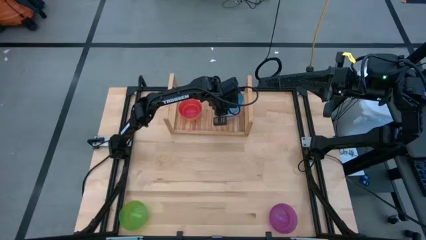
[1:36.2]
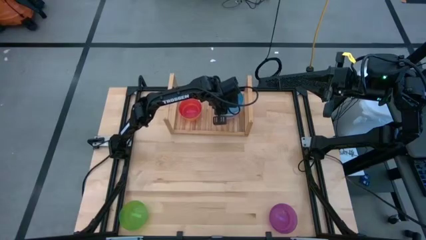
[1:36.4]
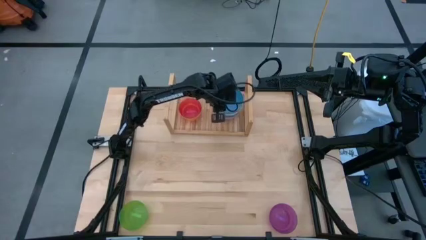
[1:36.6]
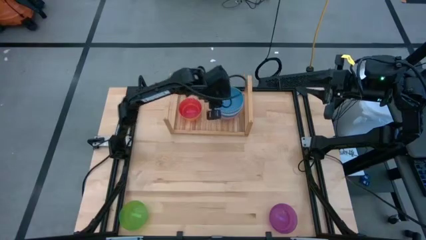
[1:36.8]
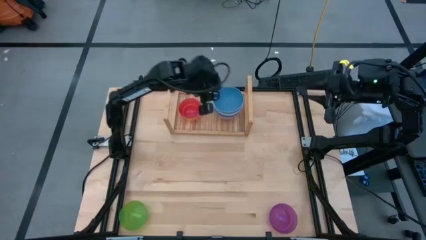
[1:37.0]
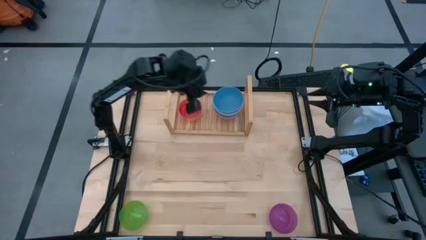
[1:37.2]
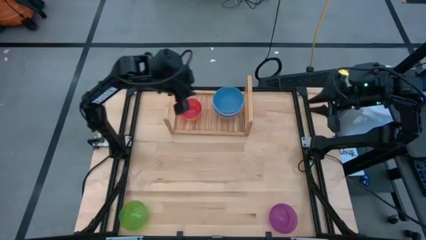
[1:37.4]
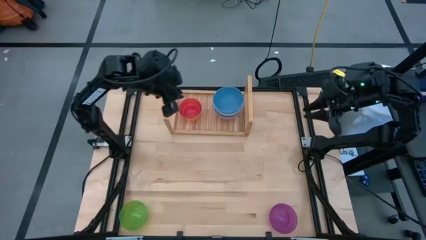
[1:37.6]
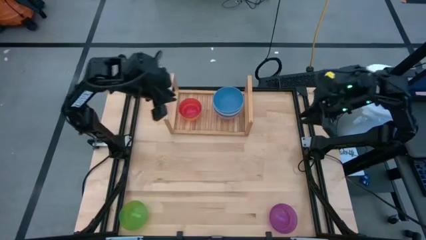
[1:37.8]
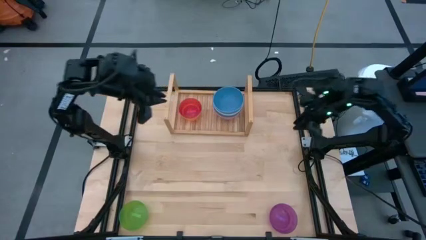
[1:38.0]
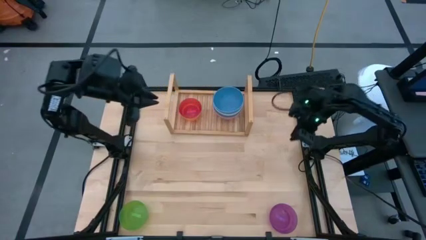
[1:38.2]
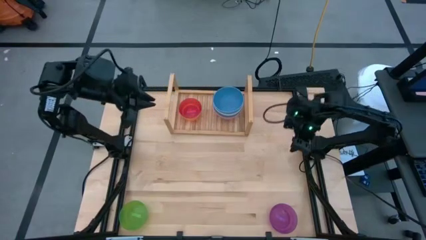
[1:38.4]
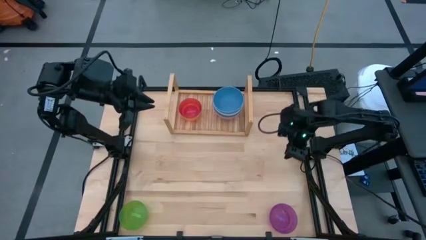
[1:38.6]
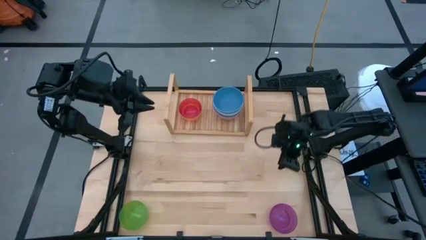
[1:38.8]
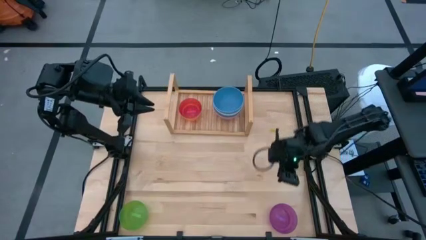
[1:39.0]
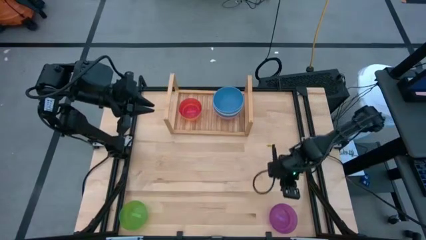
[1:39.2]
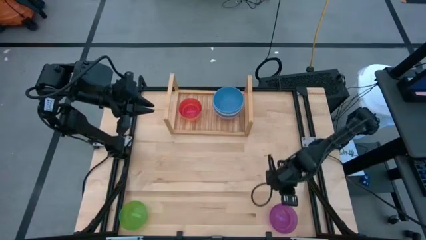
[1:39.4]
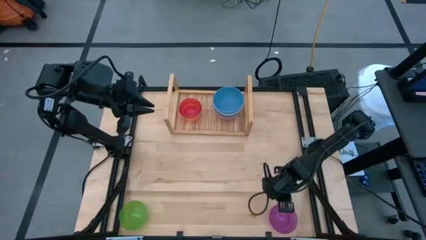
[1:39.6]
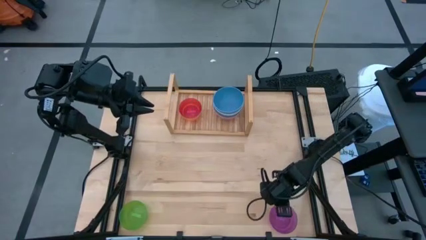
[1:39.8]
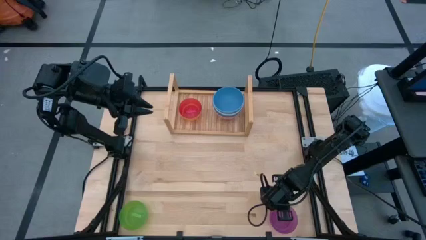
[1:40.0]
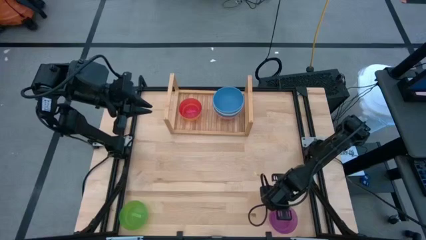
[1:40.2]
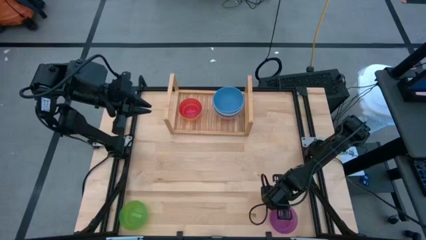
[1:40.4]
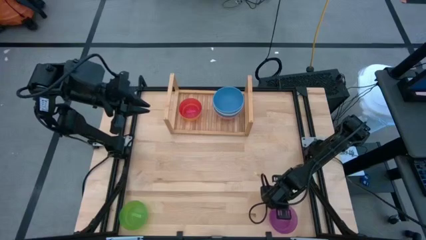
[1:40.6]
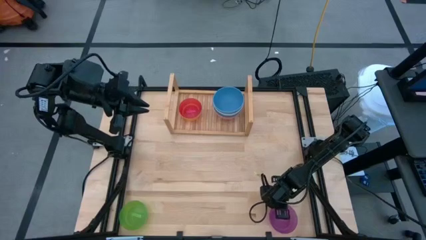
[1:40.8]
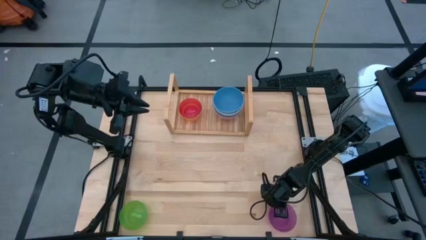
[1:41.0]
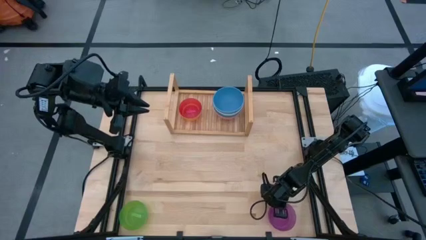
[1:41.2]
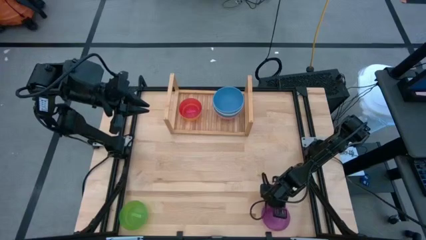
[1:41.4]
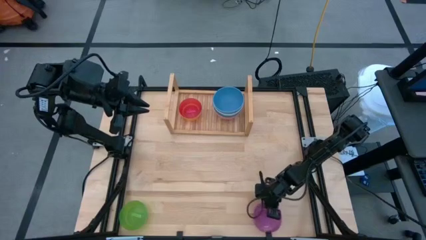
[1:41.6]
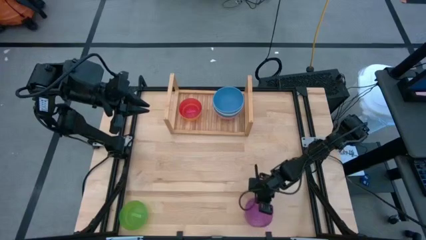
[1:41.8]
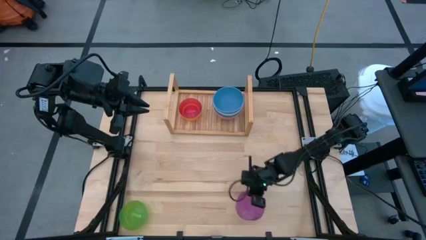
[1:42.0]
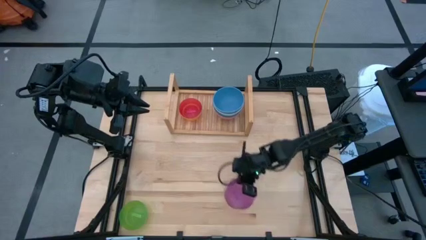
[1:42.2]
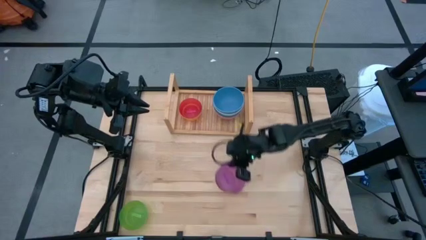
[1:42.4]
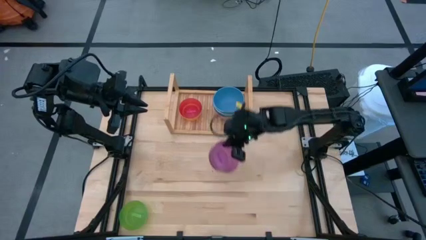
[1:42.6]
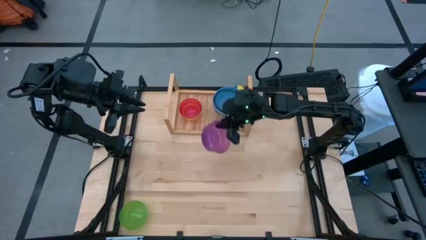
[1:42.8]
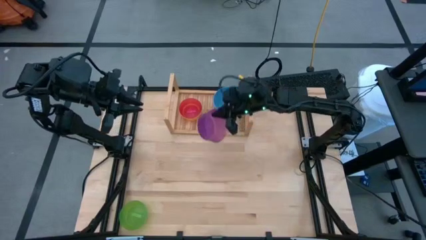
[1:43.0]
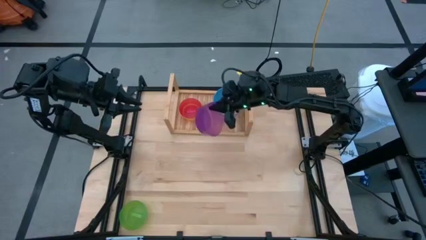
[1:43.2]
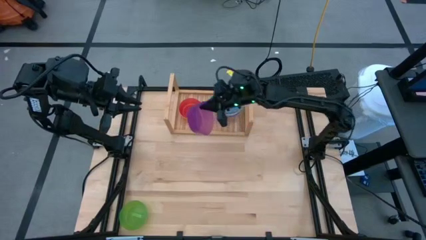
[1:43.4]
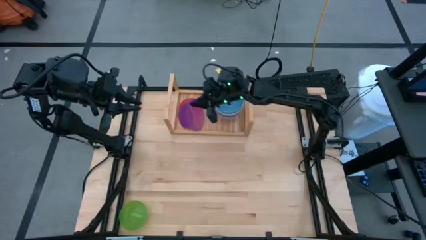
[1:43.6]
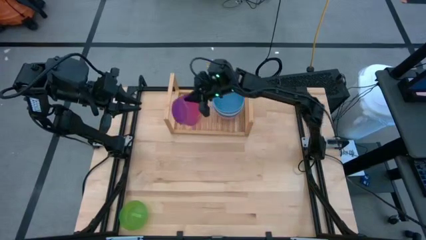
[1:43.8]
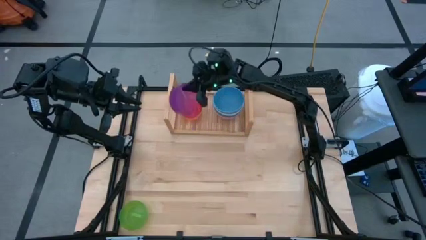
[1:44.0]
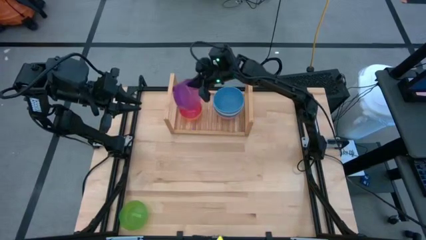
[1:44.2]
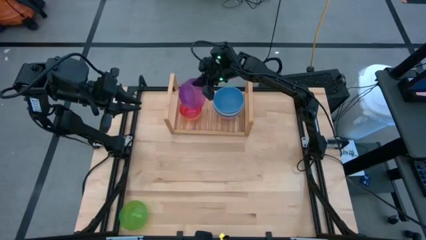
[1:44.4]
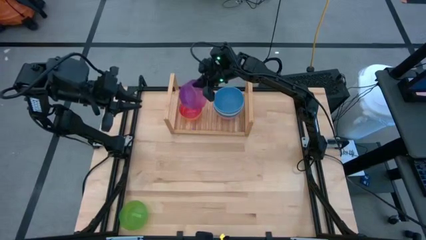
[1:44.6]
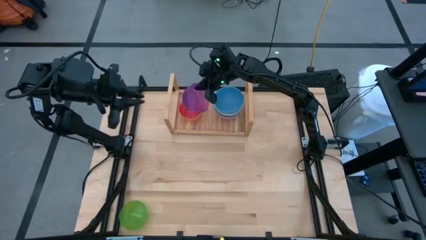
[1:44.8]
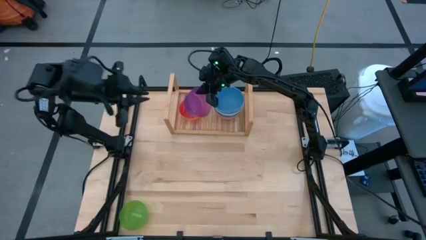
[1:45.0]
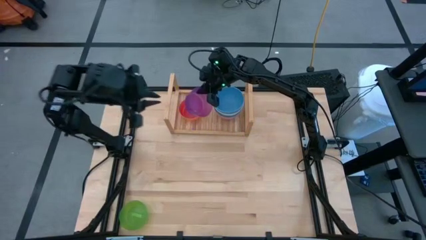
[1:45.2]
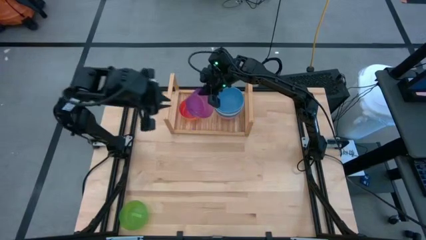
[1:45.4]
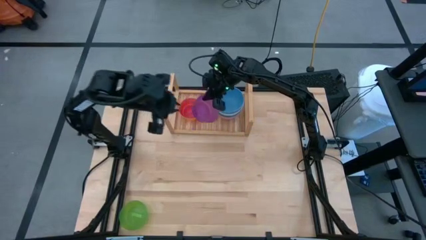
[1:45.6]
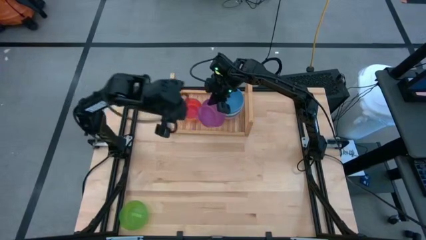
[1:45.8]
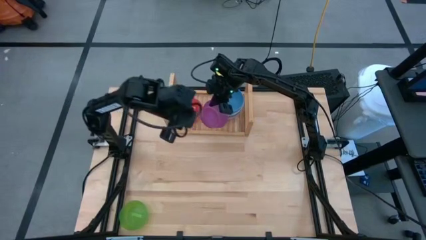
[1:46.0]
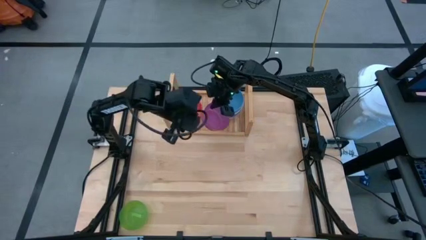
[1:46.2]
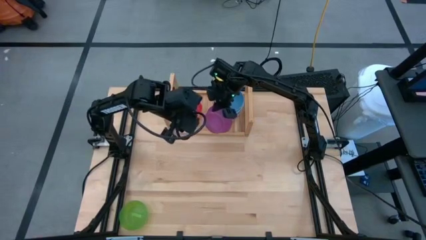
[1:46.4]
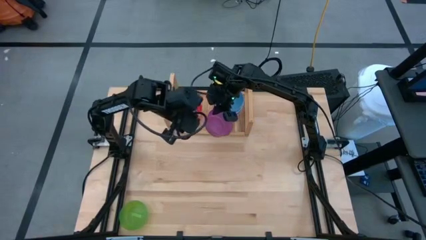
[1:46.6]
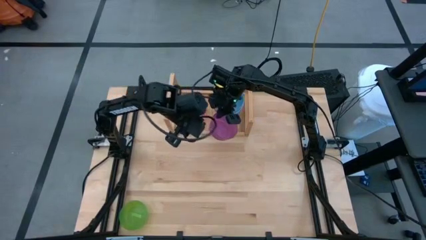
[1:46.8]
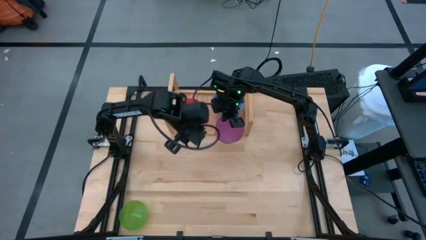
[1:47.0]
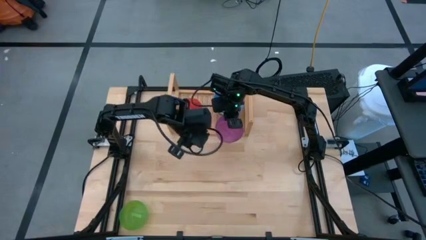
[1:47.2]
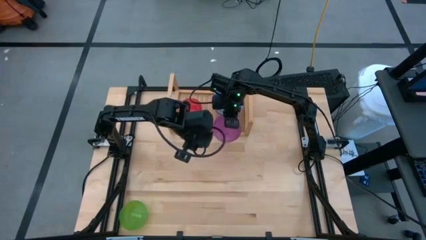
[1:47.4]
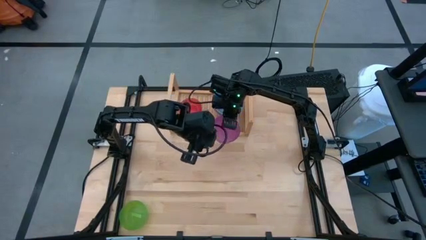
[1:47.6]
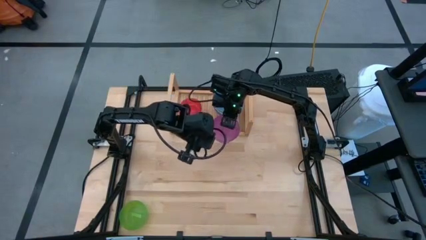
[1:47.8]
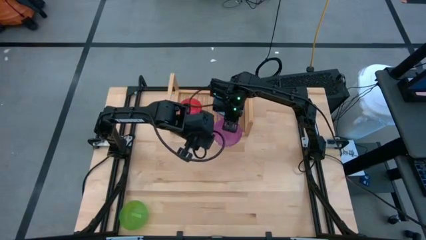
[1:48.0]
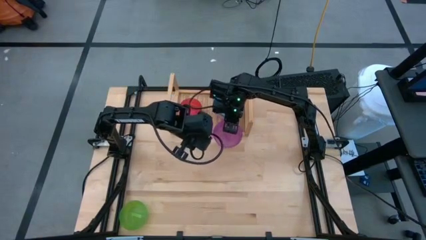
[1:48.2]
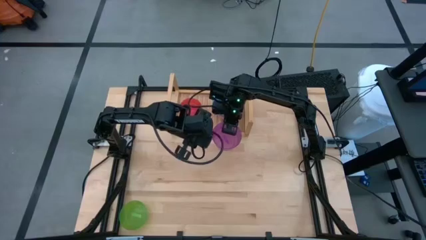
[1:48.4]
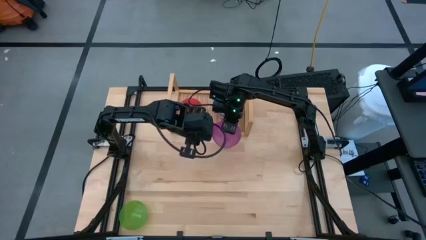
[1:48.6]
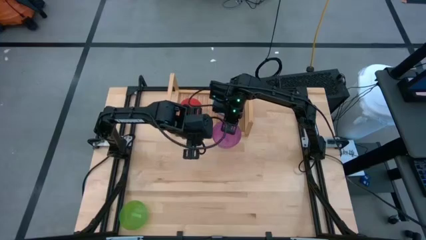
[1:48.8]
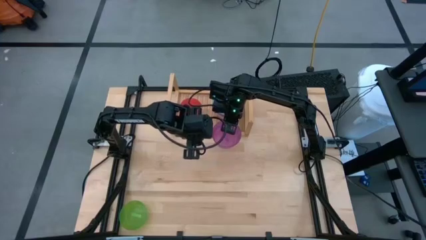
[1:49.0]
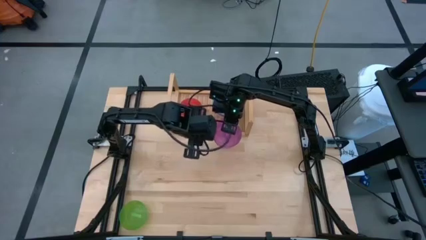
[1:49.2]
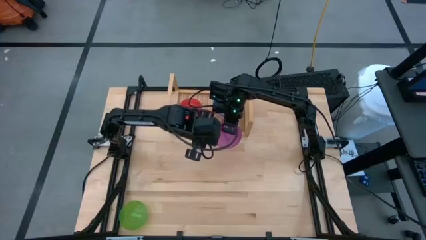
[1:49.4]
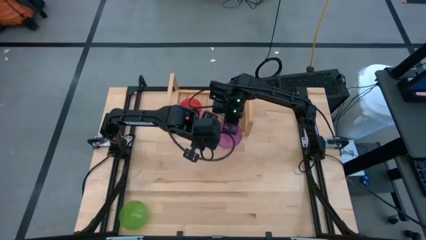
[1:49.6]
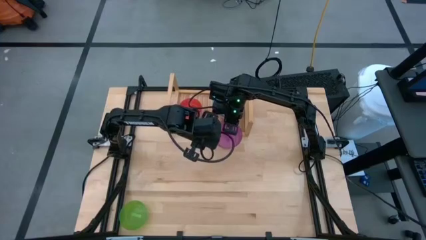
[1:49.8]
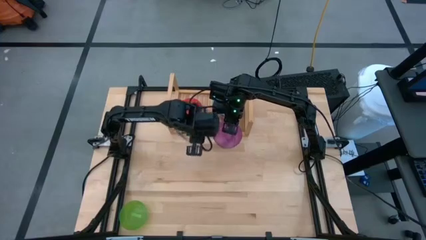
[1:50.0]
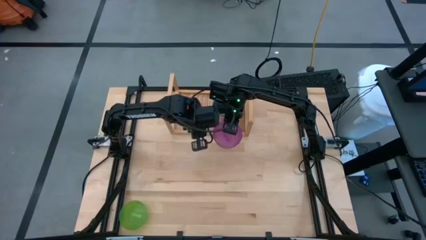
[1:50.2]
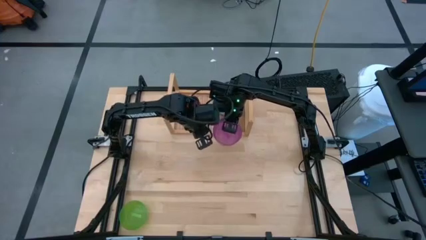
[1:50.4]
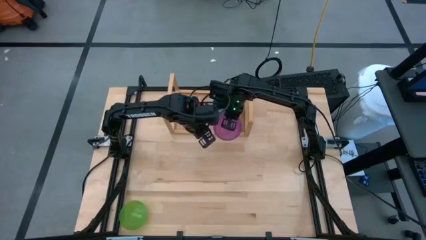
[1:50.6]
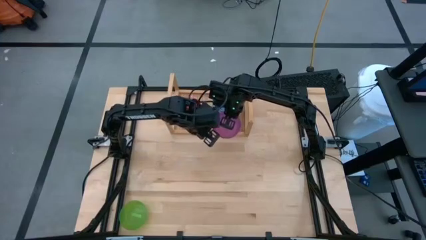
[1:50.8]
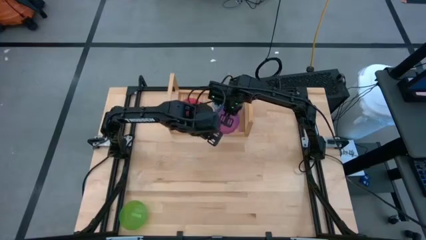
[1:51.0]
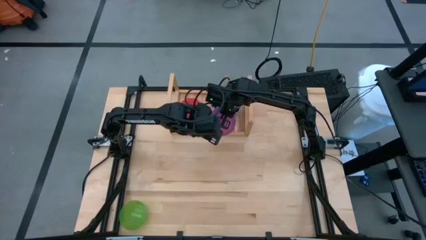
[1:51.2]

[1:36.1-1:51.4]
Task: Place and stack bowls onto a shelf
Stack the violet bowl onto the red bowl
